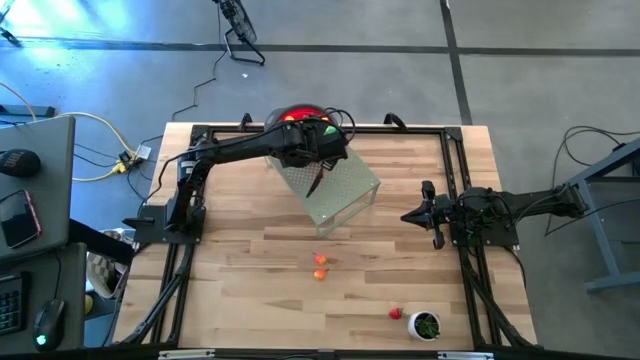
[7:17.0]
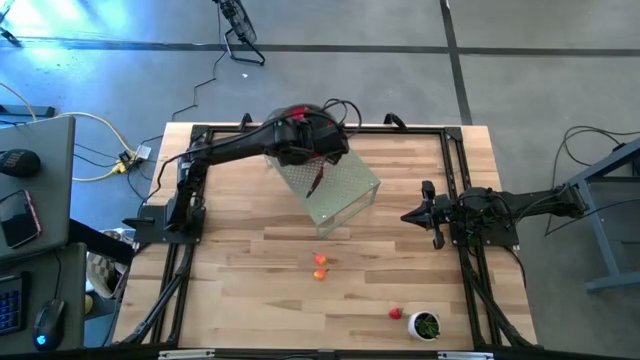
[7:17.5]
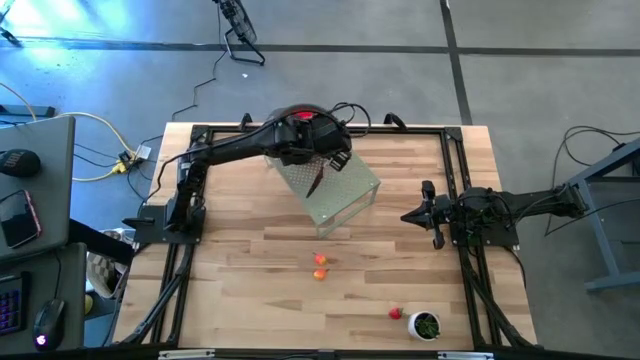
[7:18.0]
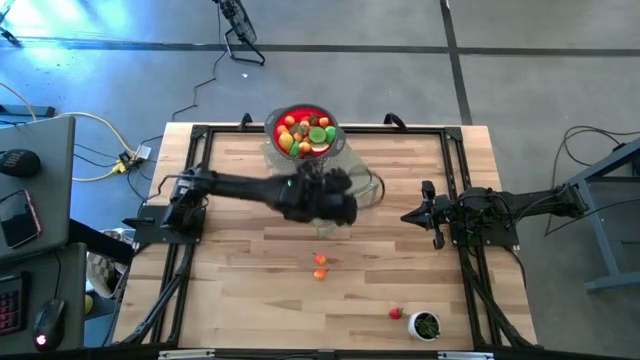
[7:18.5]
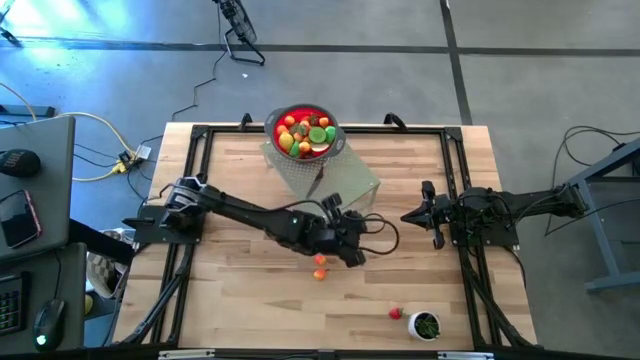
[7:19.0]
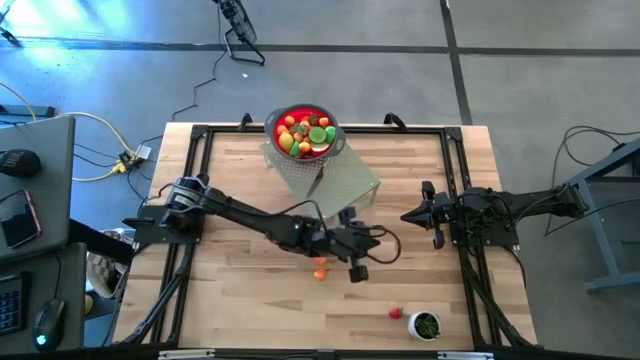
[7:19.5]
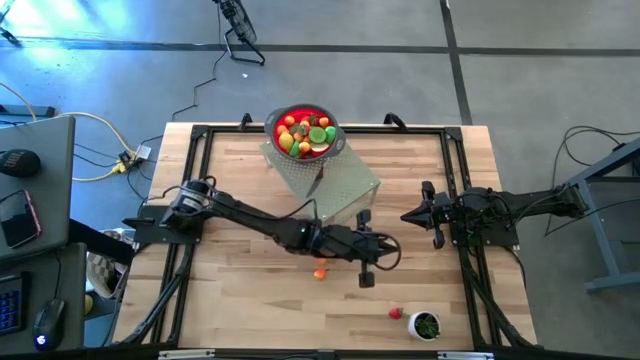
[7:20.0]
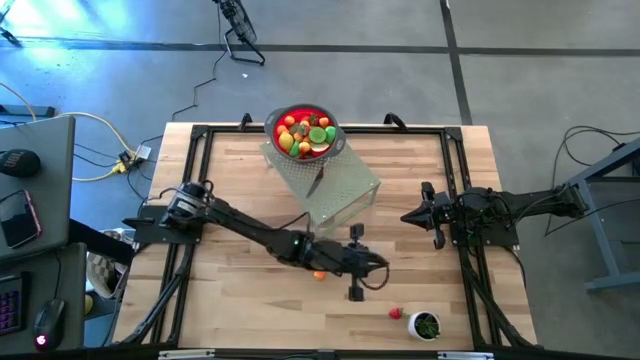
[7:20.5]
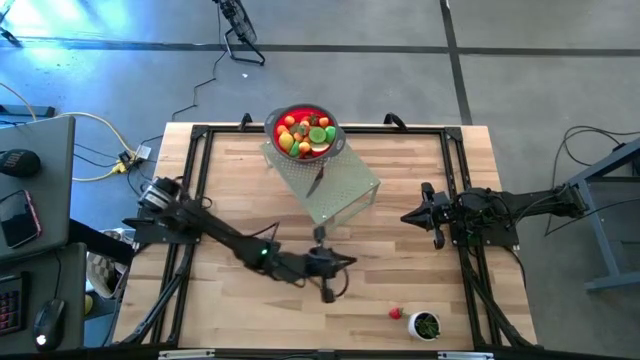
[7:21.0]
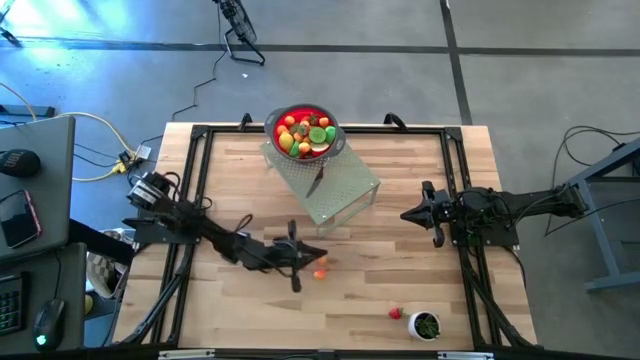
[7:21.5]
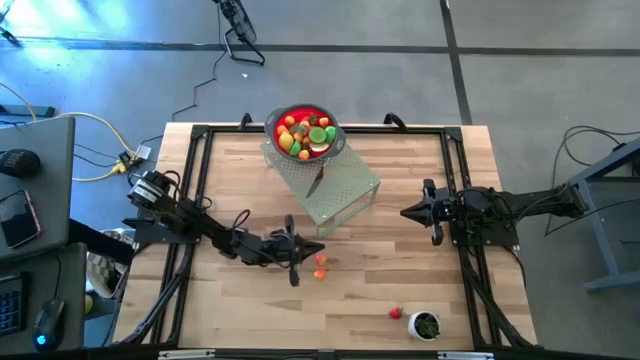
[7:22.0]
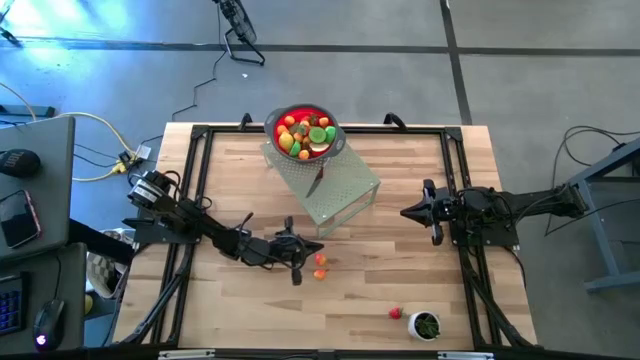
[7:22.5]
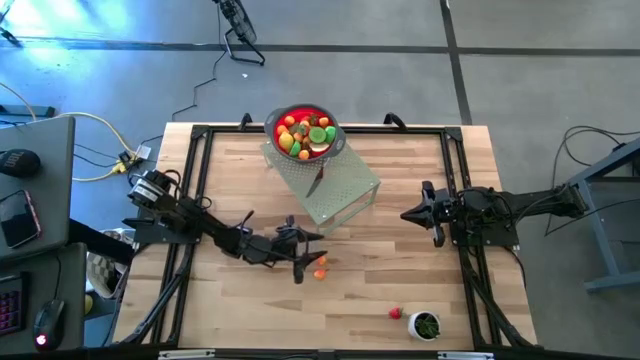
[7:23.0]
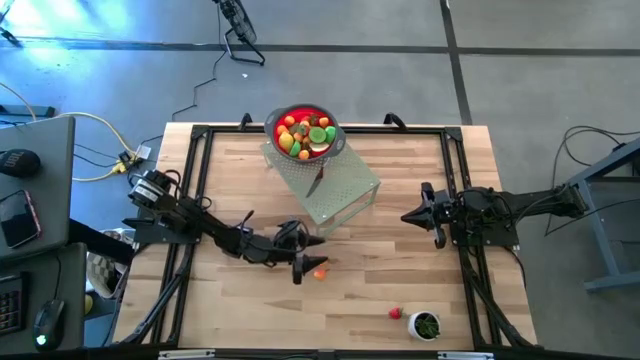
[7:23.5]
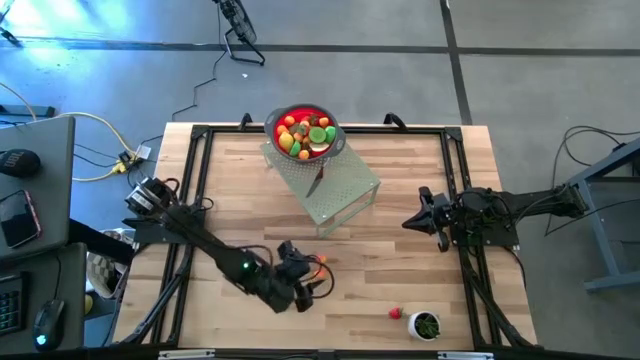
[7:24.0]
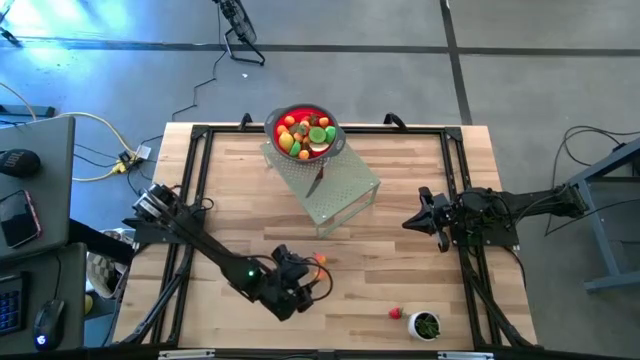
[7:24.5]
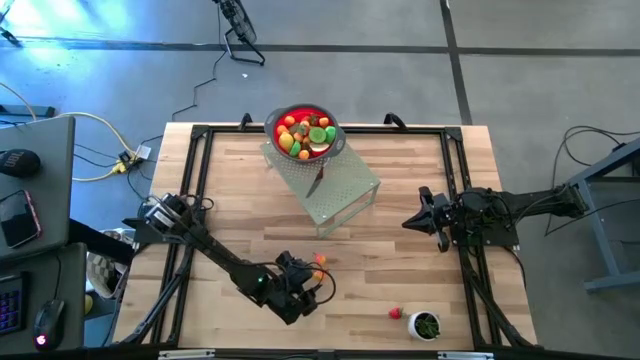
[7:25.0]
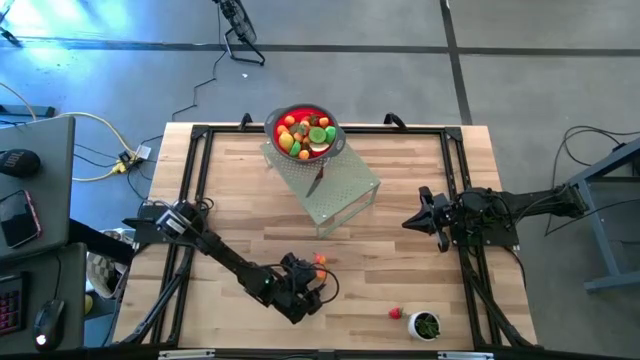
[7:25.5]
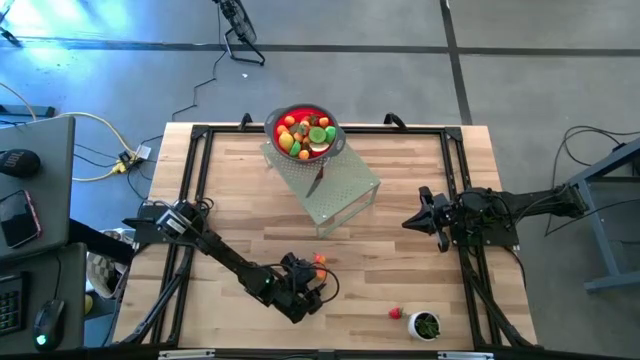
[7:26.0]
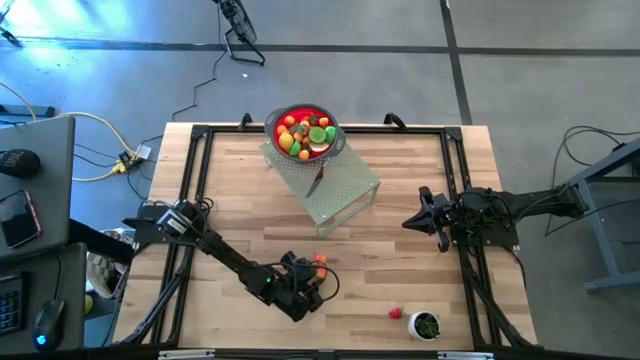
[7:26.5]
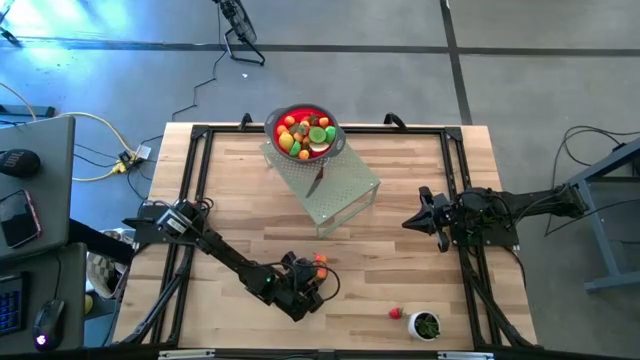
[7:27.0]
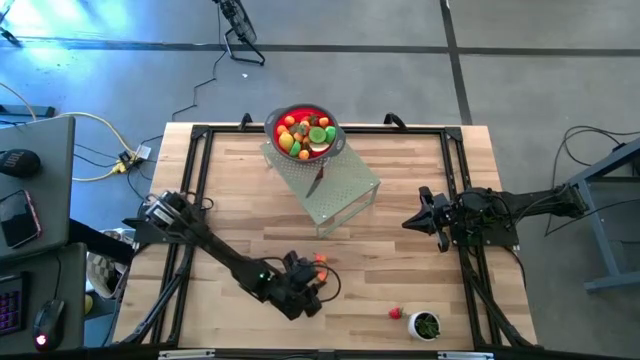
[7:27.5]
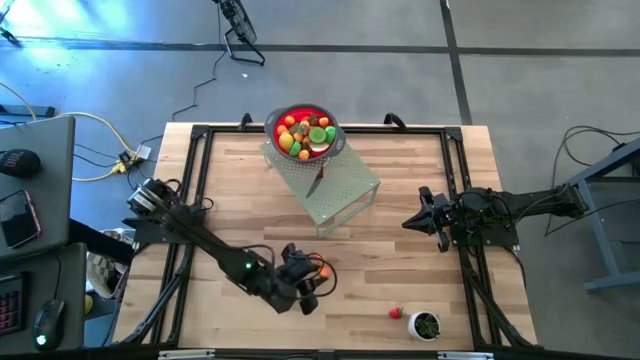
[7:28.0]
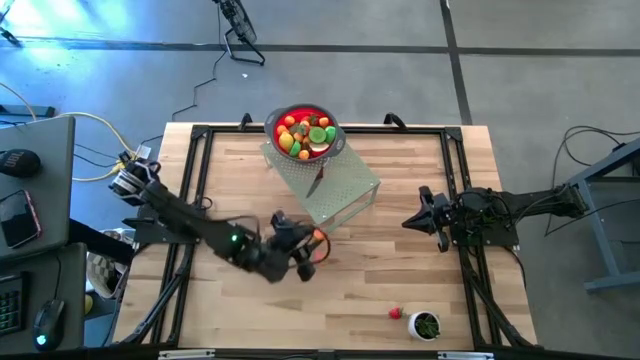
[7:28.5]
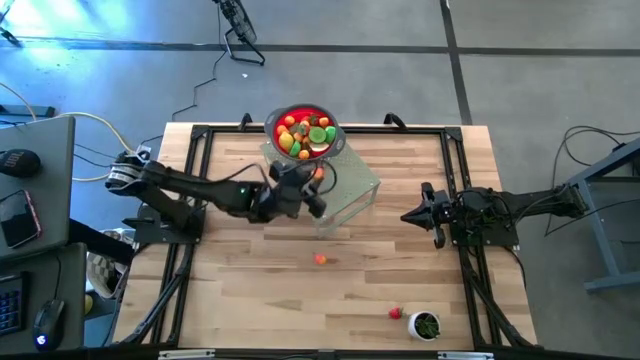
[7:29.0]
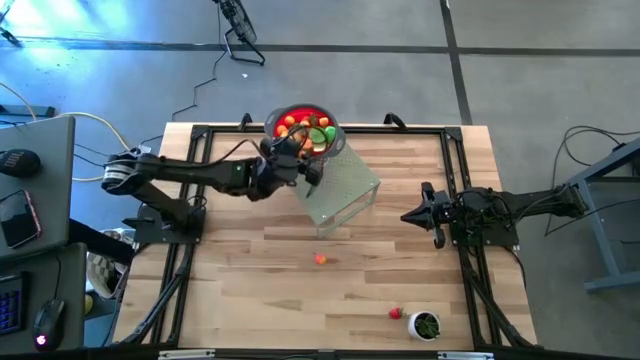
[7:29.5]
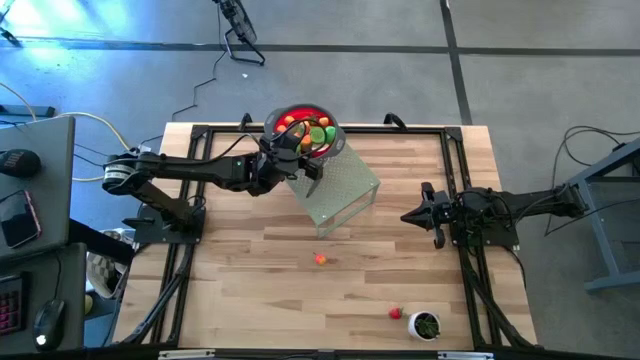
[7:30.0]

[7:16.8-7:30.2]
Task: Pick & Place Fruit
Put the orange pear into the red strainer on the shelf

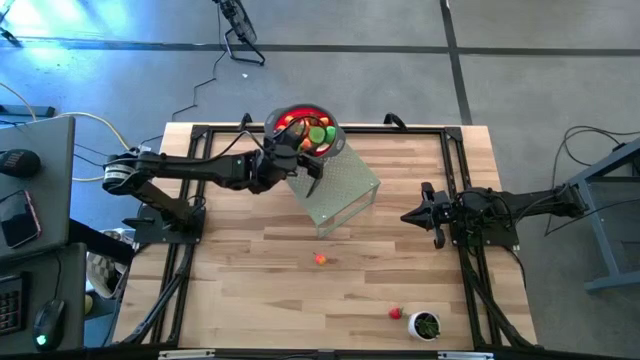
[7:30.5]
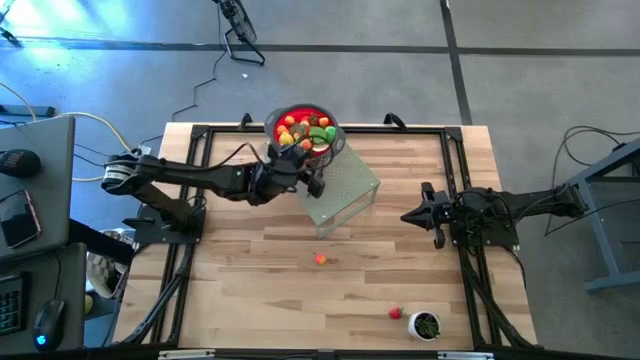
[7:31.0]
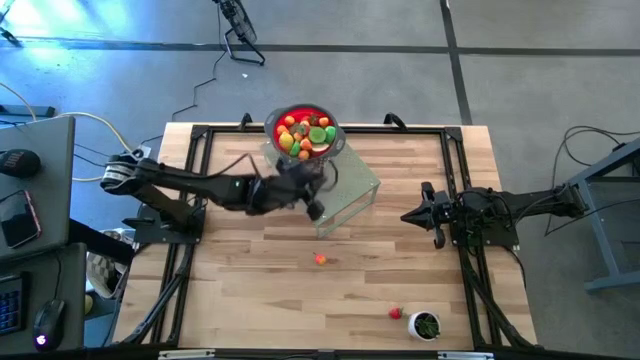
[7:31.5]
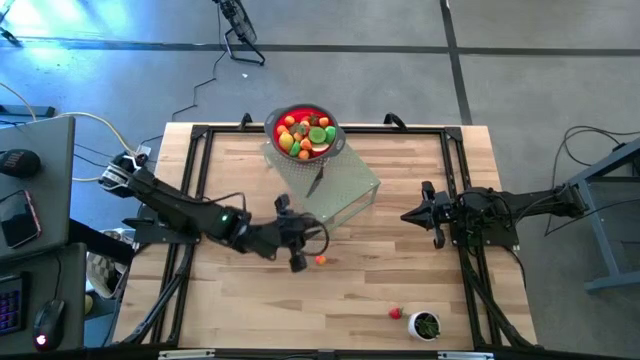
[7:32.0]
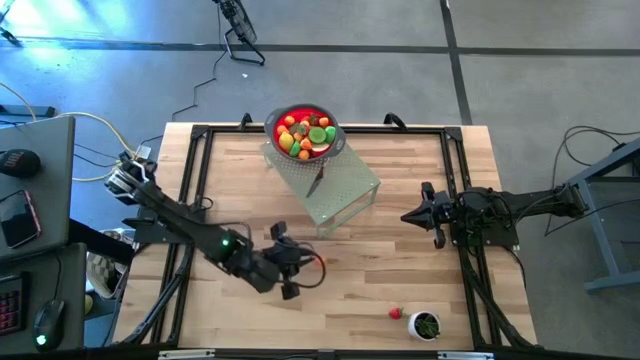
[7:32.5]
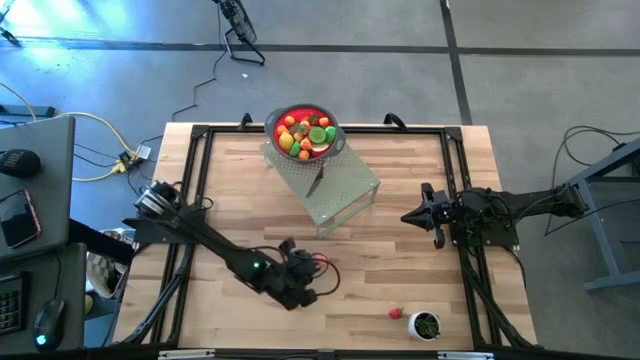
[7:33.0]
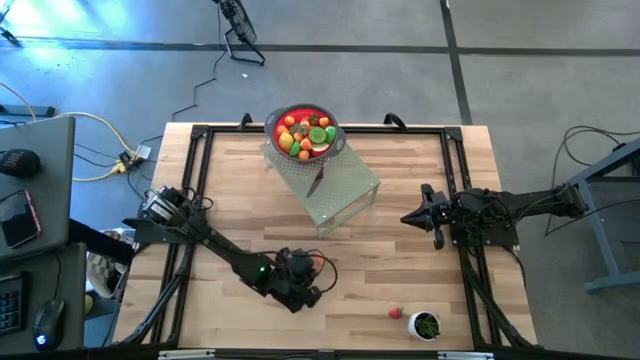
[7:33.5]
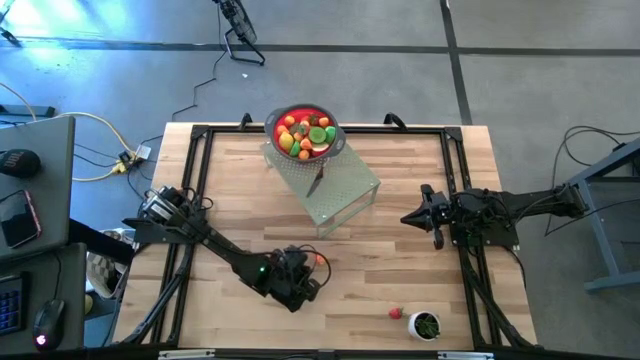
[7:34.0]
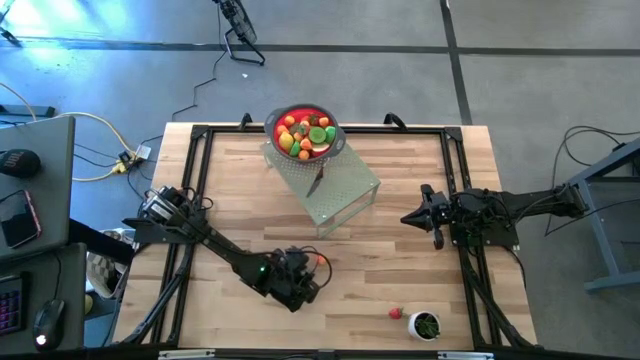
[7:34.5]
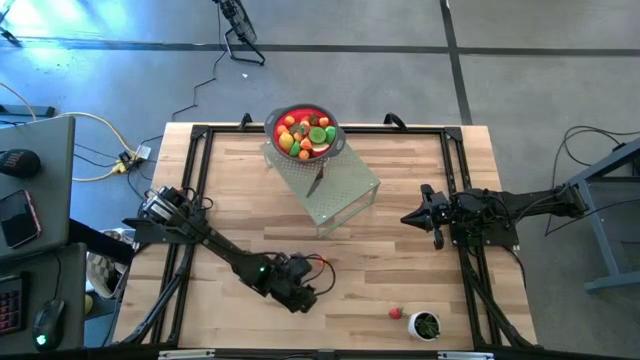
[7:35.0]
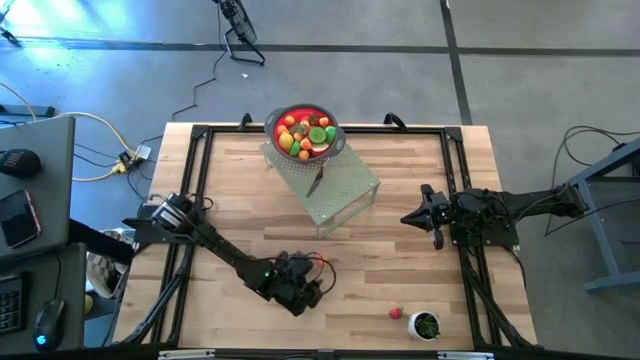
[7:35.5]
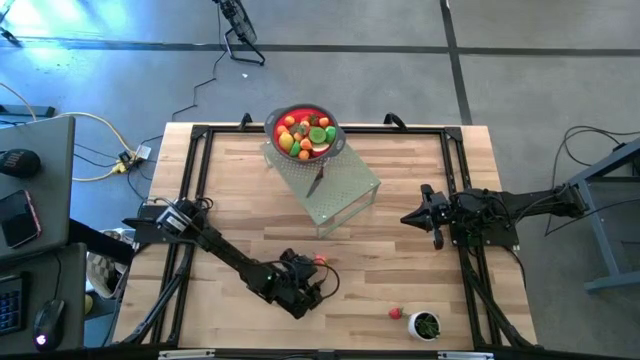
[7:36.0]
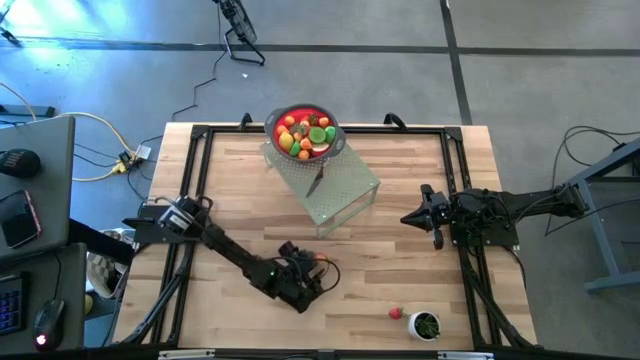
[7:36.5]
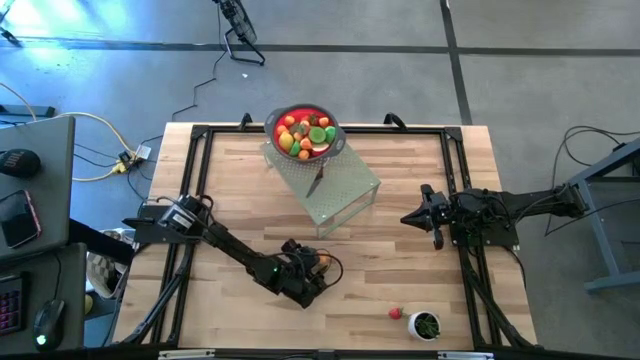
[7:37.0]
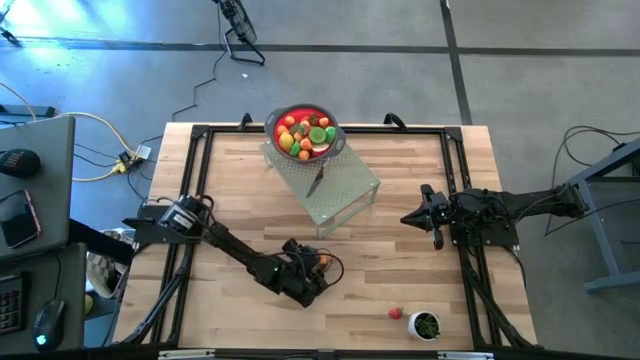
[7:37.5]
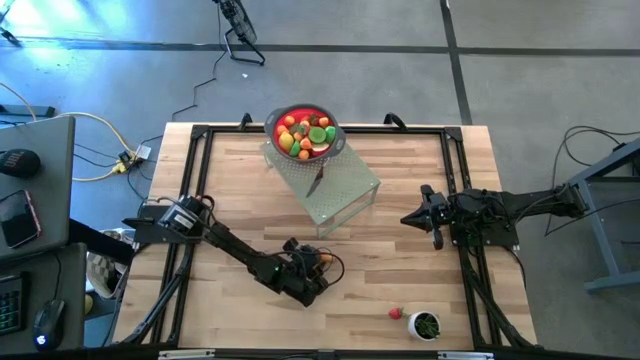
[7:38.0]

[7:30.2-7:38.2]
Put the orange pear into the red strainer on the shelf
